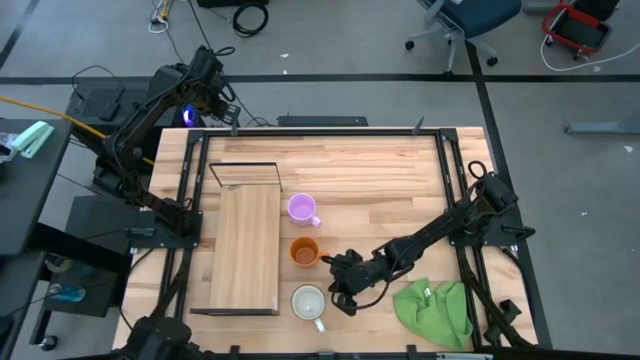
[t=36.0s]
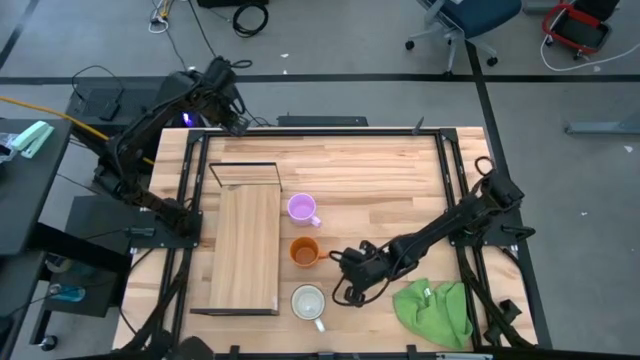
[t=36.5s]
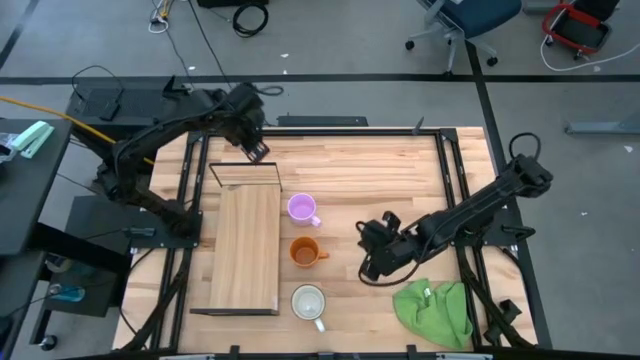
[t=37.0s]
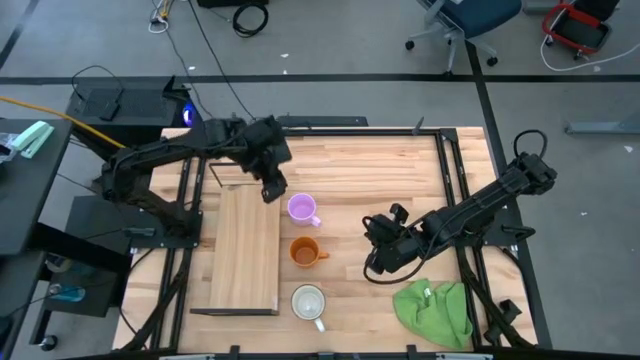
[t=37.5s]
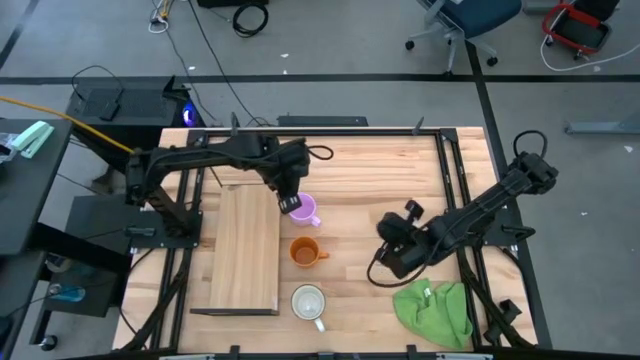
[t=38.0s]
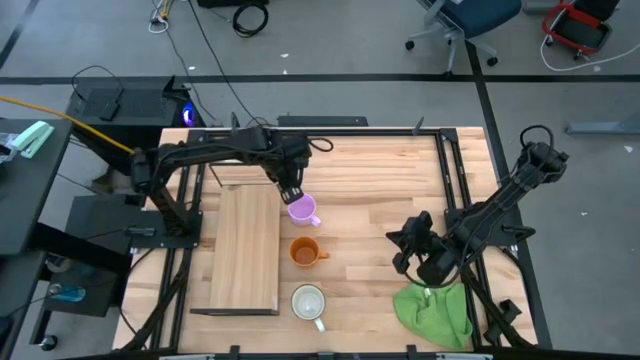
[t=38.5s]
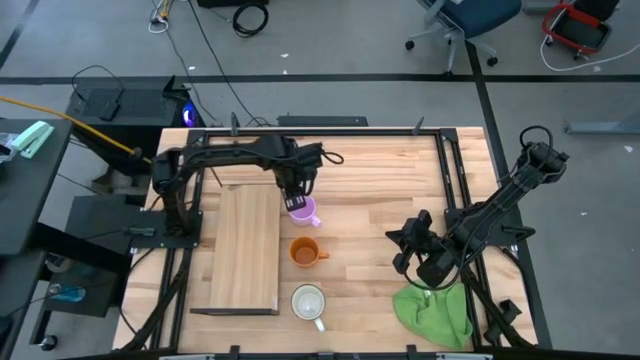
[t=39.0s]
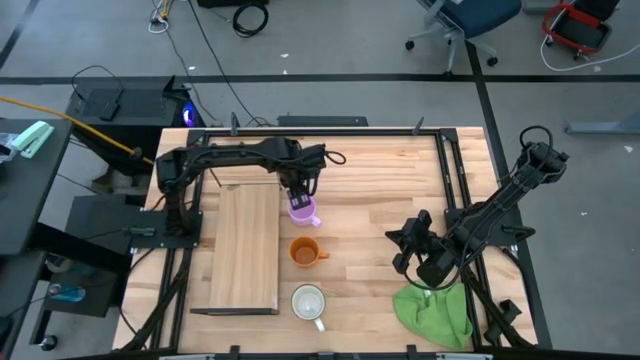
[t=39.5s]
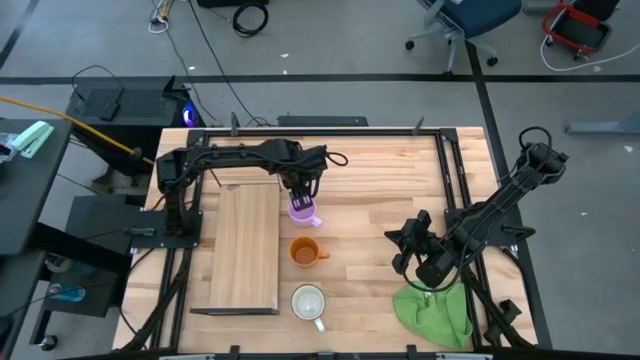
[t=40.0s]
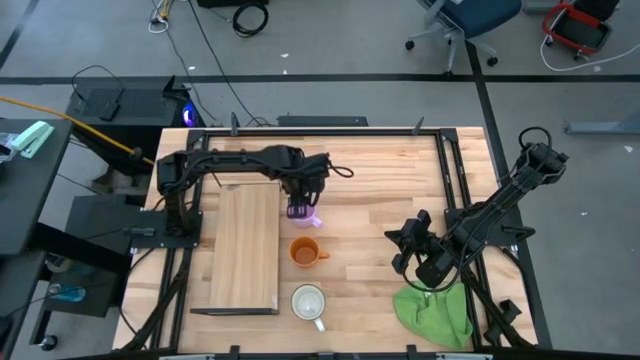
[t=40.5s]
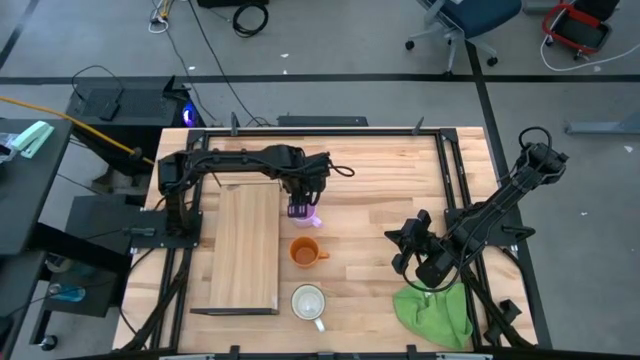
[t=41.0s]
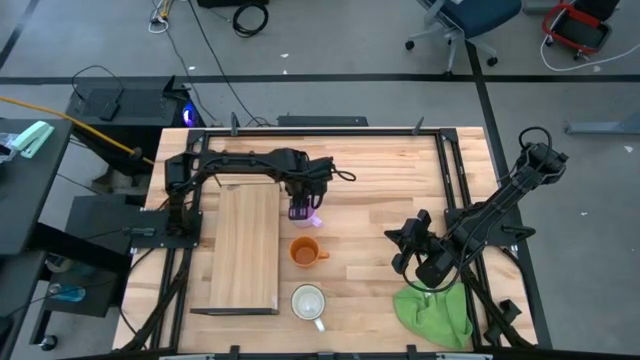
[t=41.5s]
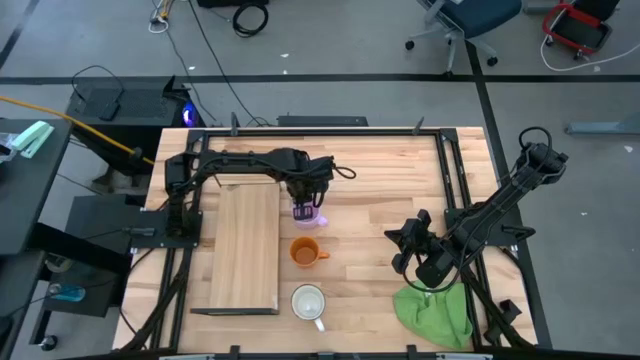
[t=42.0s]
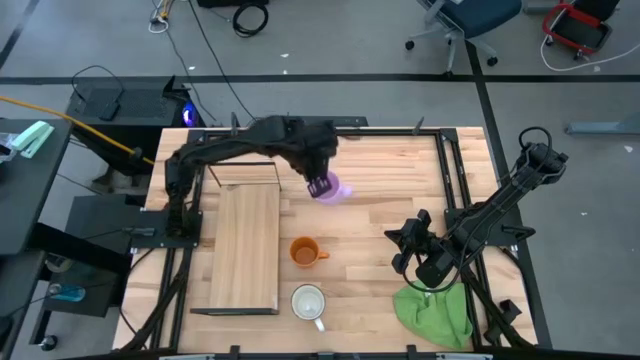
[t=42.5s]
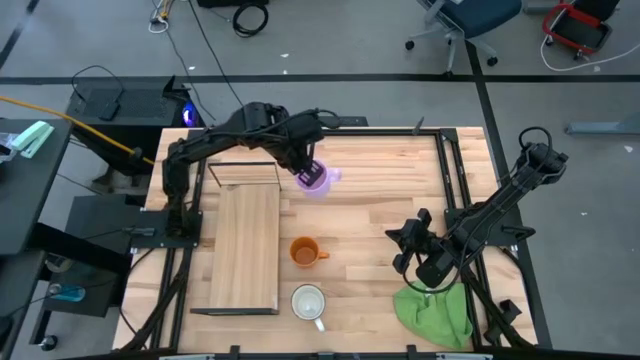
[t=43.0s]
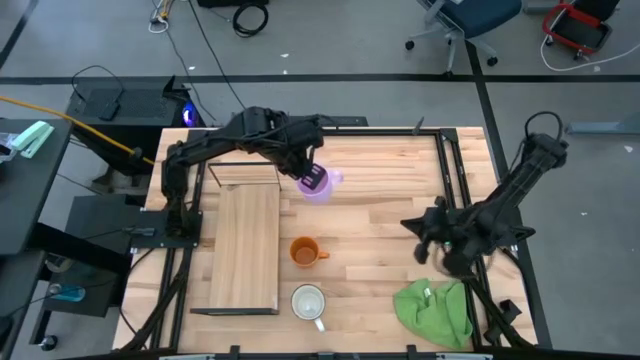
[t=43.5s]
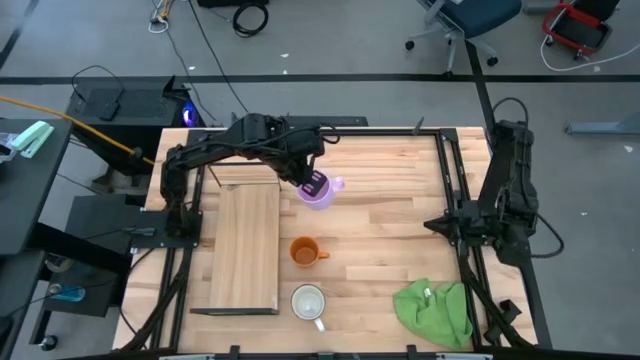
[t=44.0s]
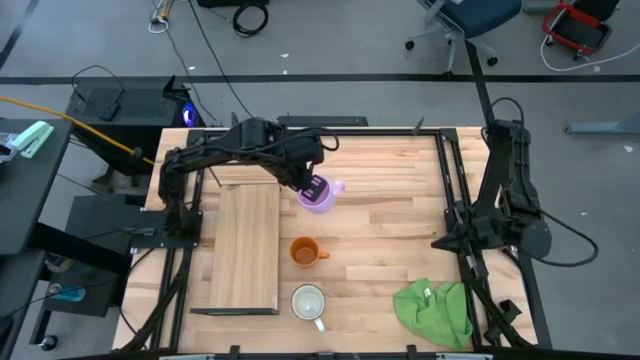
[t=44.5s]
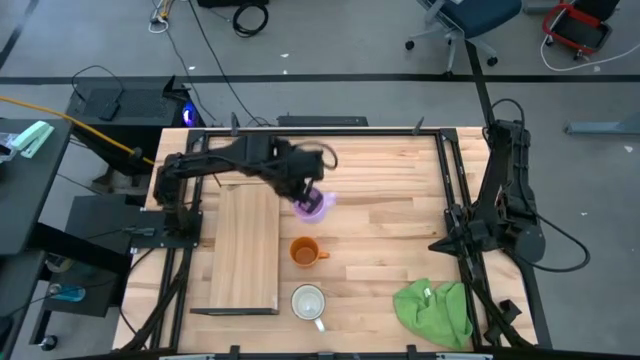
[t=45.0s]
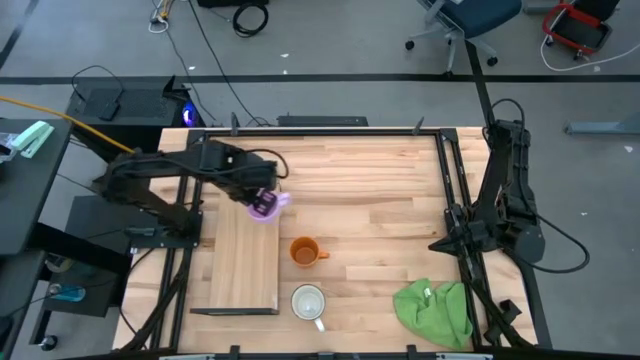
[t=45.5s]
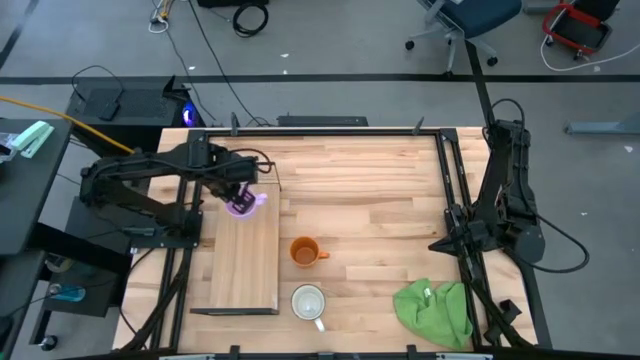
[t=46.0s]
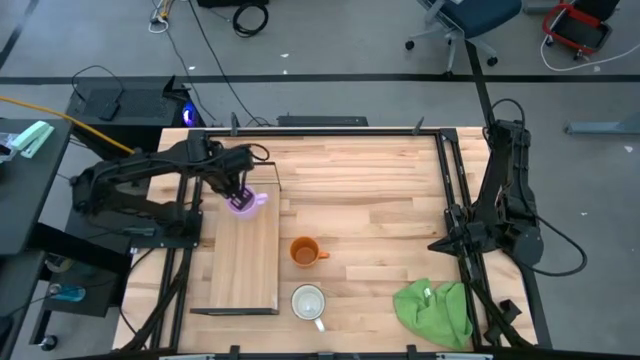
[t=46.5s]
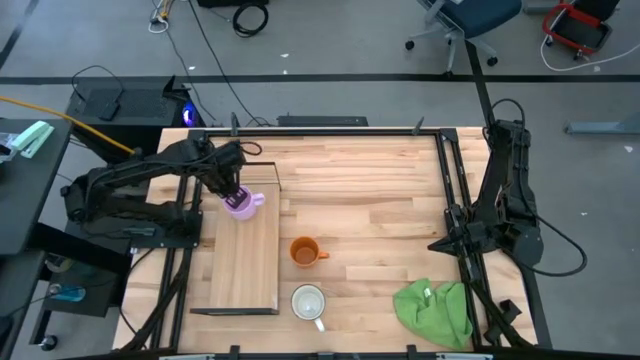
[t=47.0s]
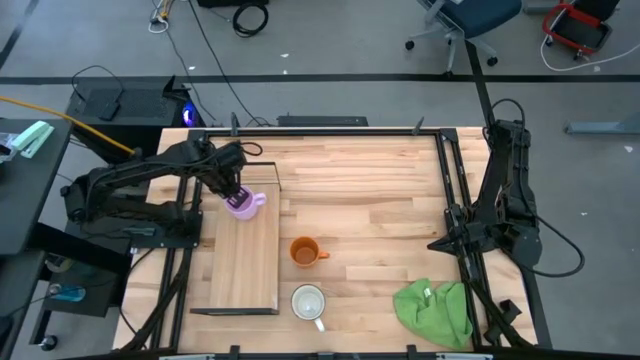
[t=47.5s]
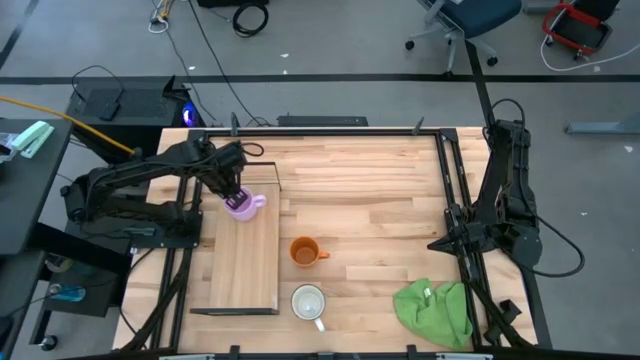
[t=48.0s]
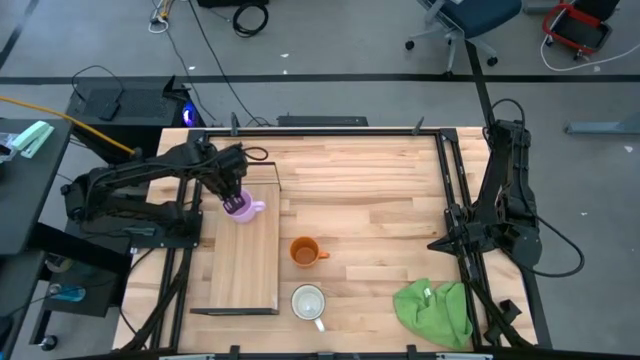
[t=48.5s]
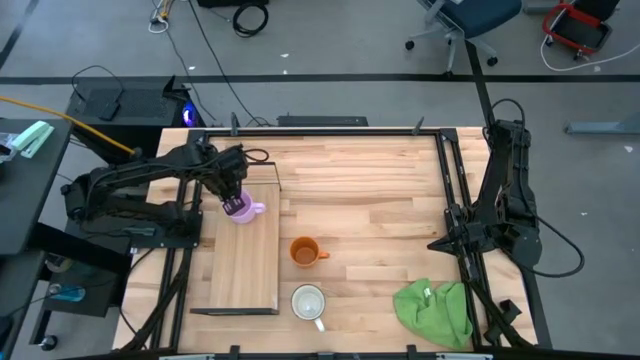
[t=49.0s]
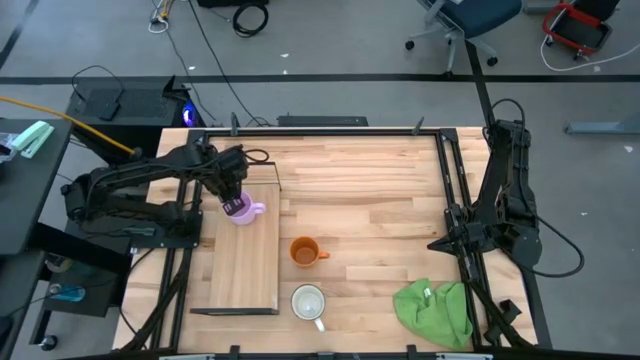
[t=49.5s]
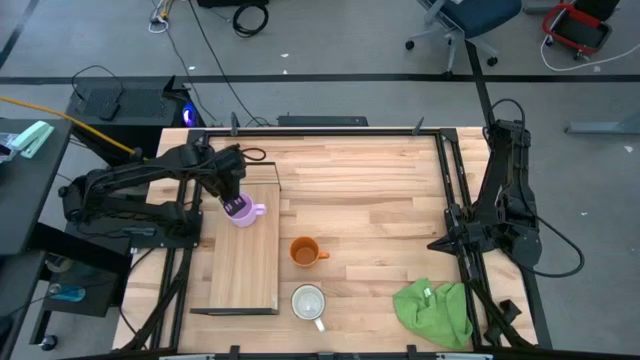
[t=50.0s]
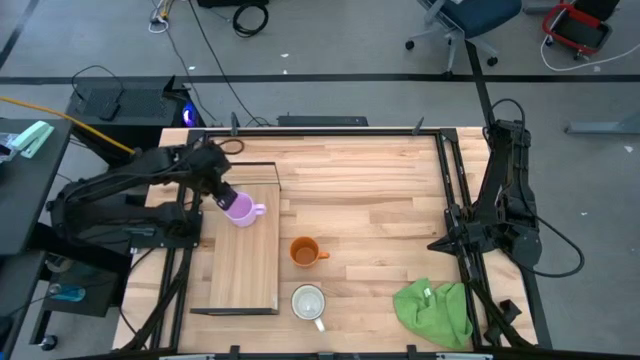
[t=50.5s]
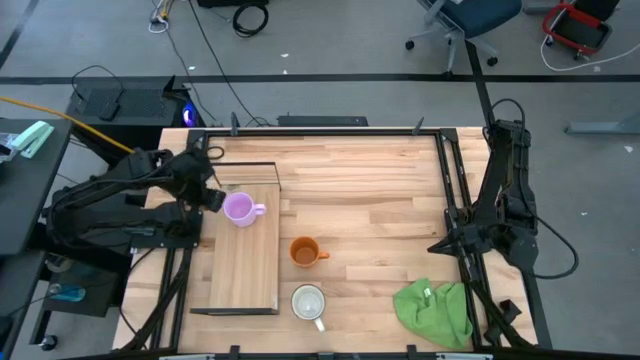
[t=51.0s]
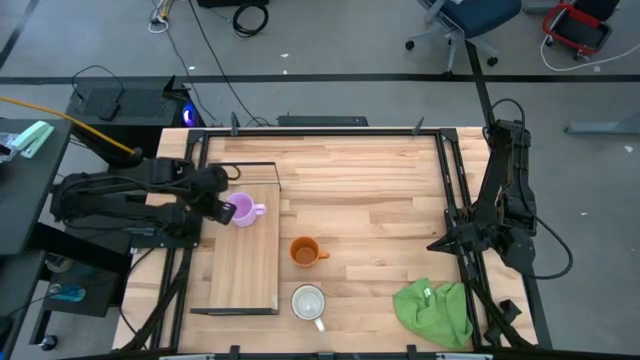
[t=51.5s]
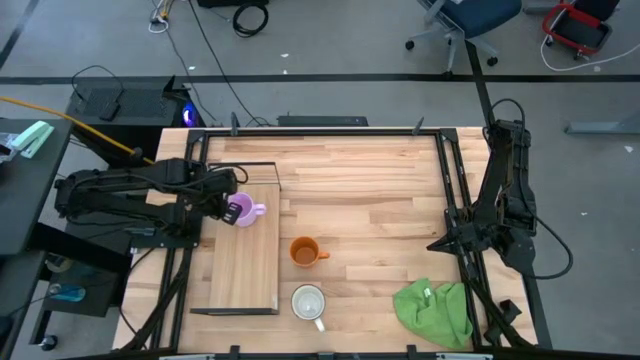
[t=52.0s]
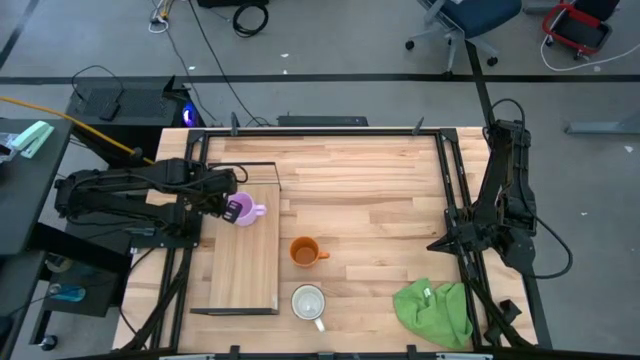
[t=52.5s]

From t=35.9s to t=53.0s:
Task: Stack small to large cups/mugs on shelf
Put the pink mug on top of the shelf

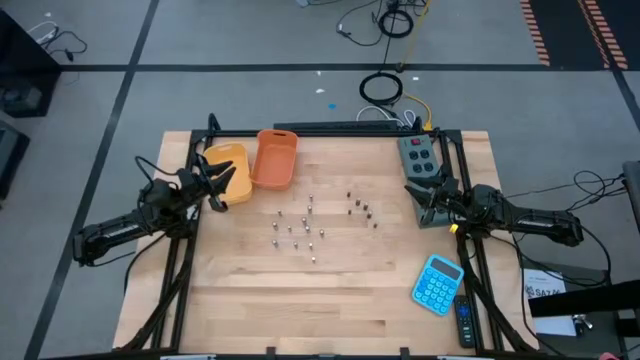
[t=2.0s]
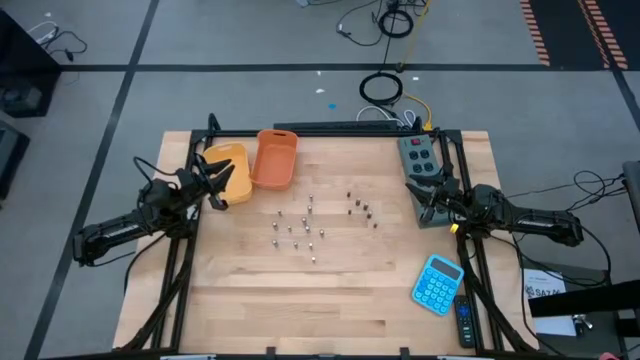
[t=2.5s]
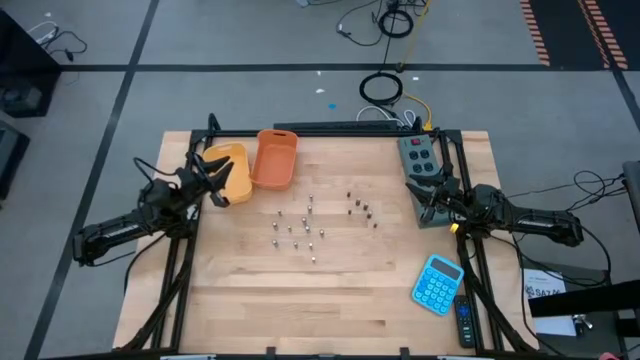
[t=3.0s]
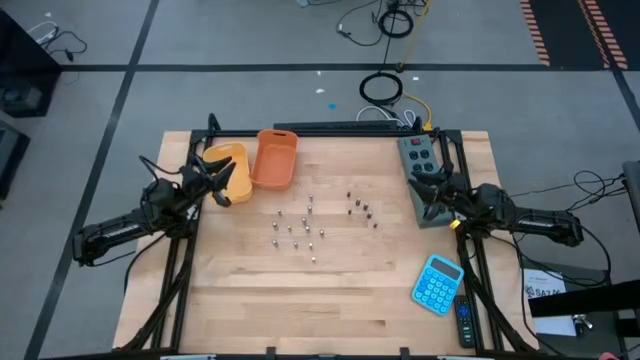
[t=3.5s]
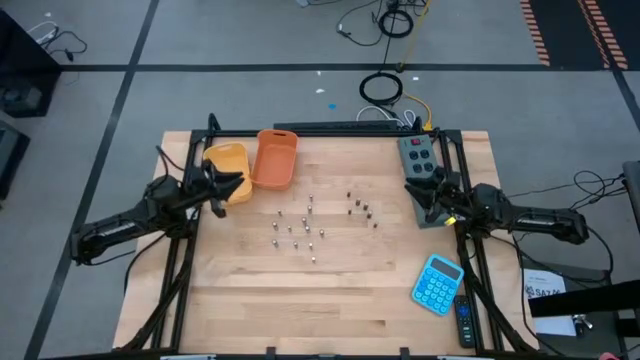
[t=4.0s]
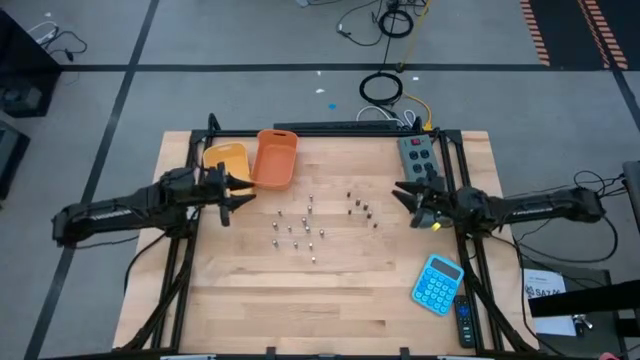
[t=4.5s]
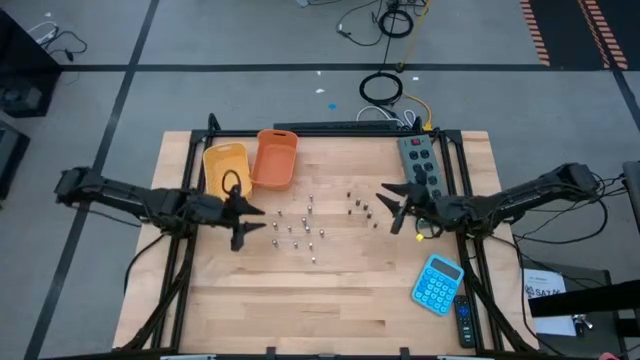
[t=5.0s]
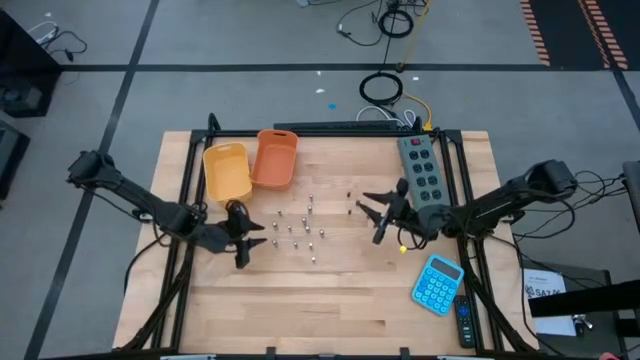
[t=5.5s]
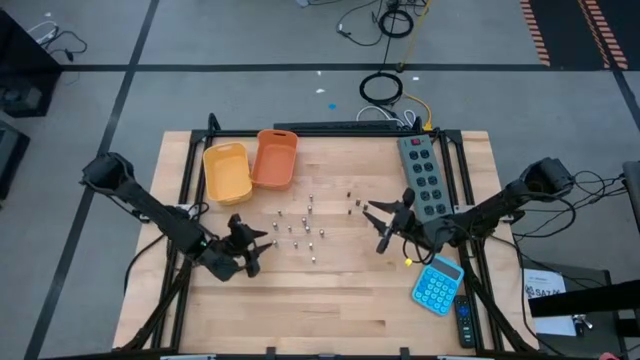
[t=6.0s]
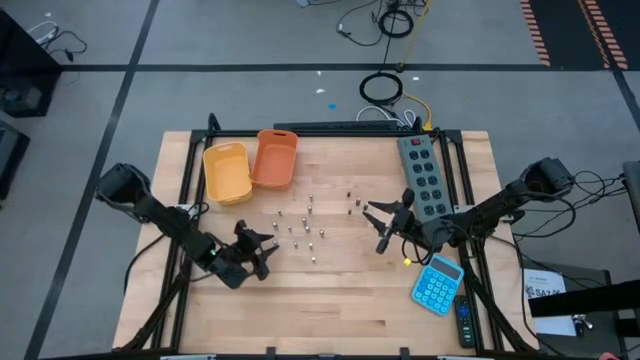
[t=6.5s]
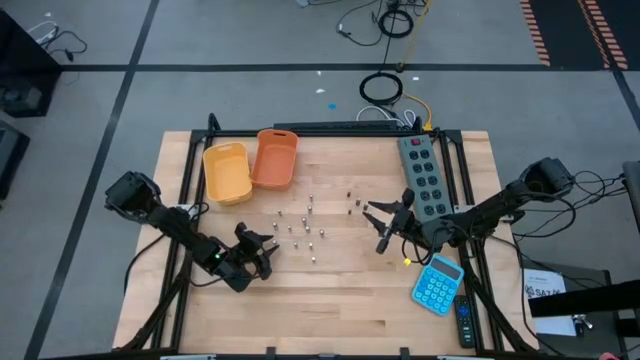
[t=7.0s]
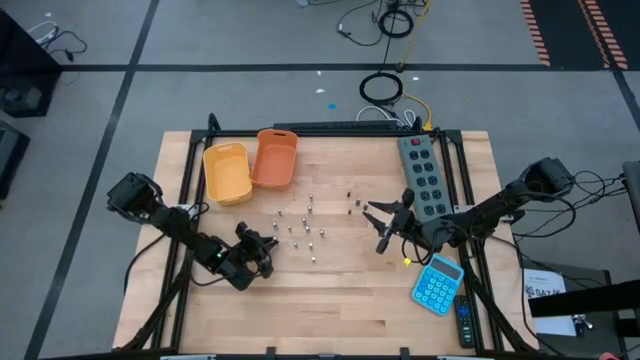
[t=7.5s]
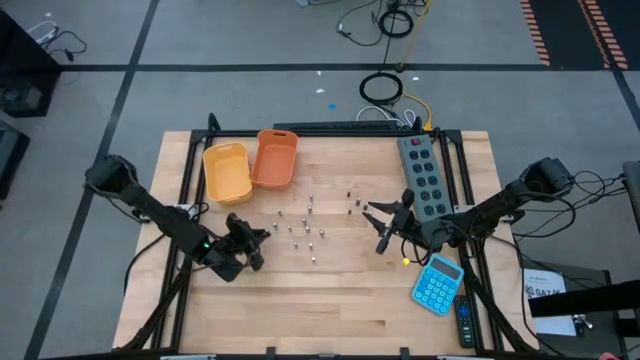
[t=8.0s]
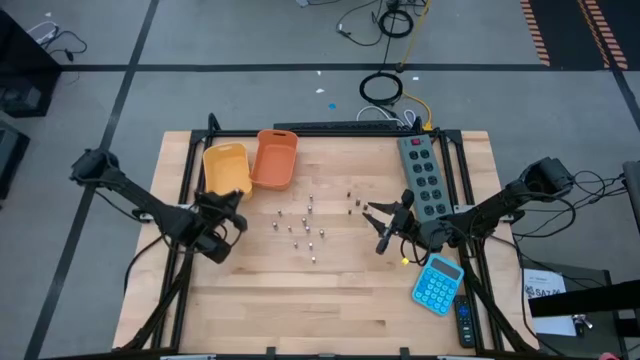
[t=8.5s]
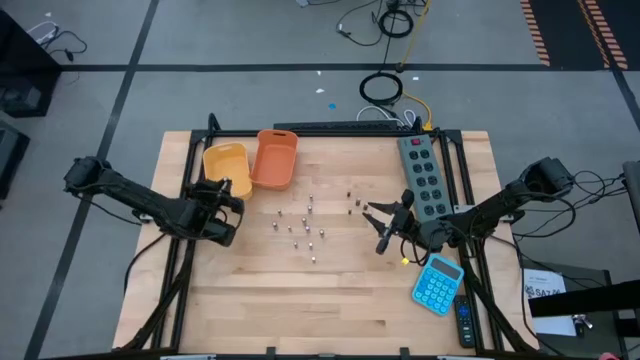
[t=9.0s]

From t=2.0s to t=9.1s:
Task: Sort batteries
Put the silver battery into the yellow bin
